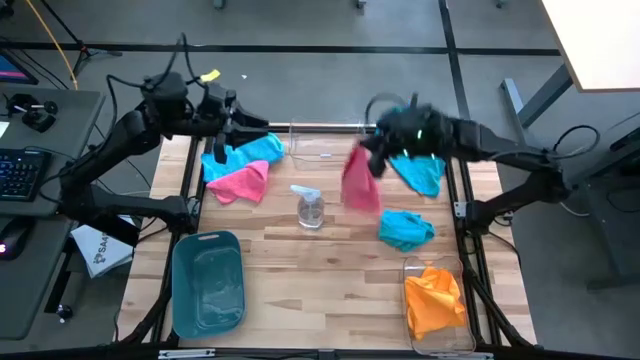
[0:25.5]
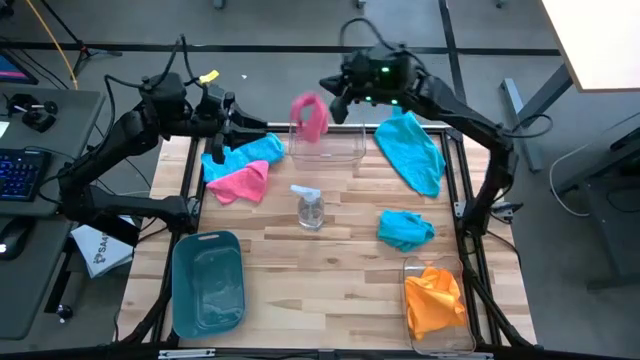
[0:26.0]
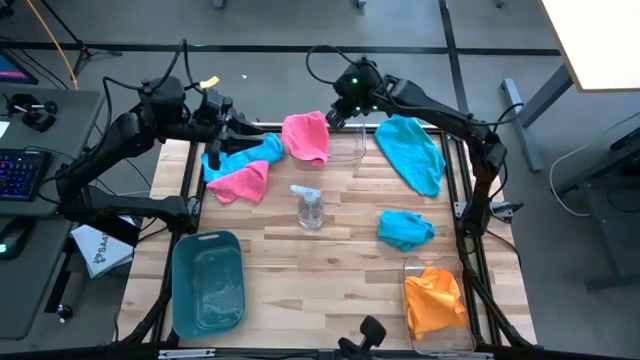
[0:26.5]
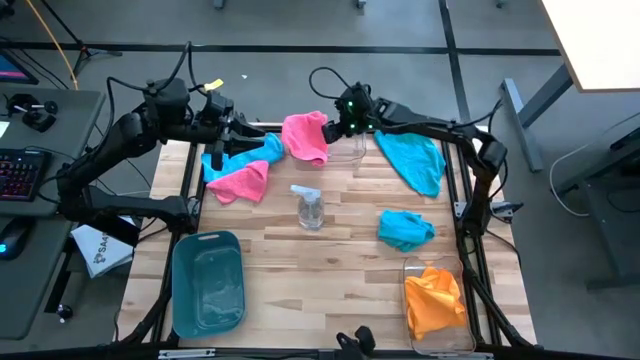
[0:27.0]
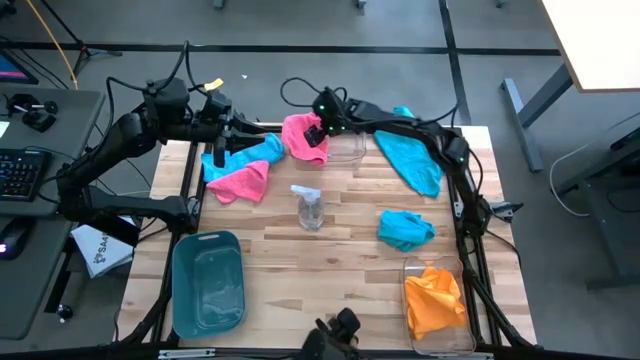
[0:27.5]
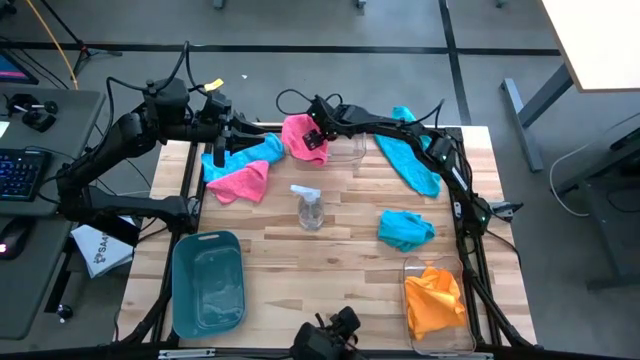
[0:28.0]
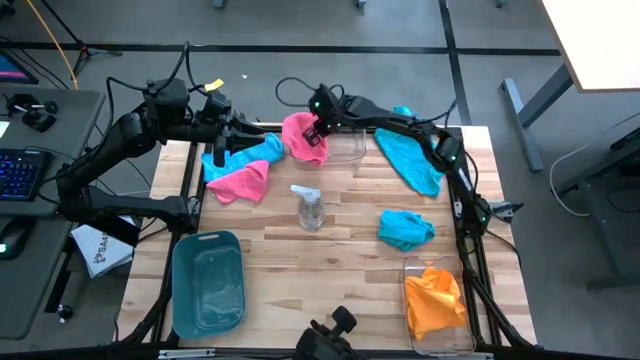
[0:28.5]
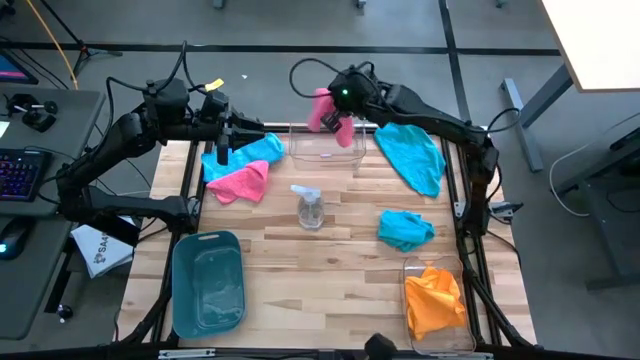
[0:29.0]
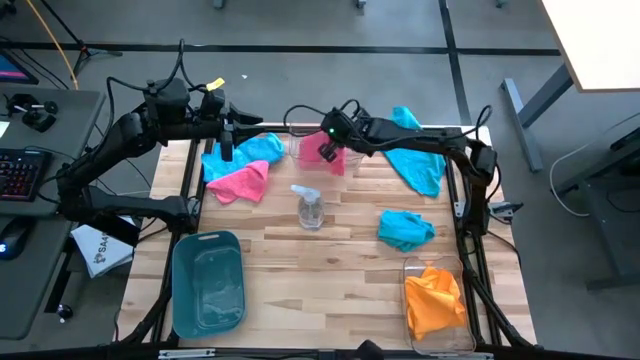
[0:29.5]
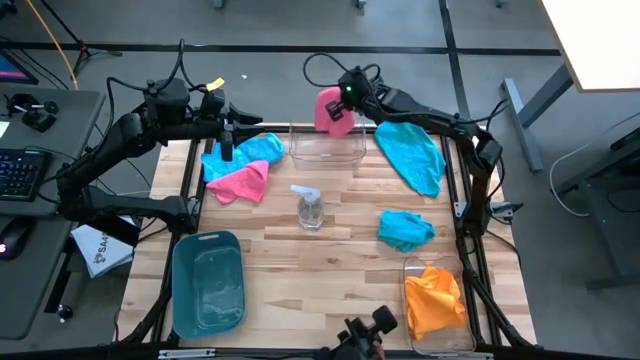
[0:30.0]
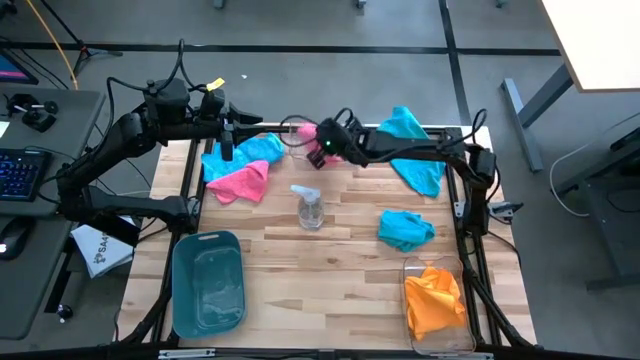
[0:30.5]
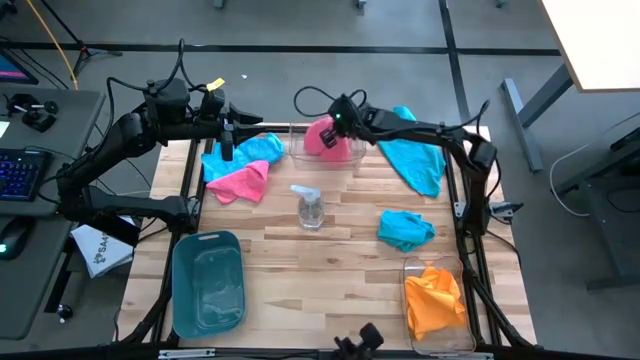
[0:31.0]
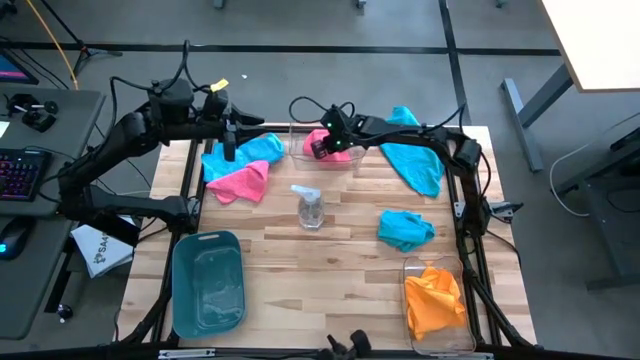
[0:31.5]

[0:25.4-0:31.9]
Task: Sort microfiber towel by color & place in baskets
Put the right pink towel into the top transparent bin

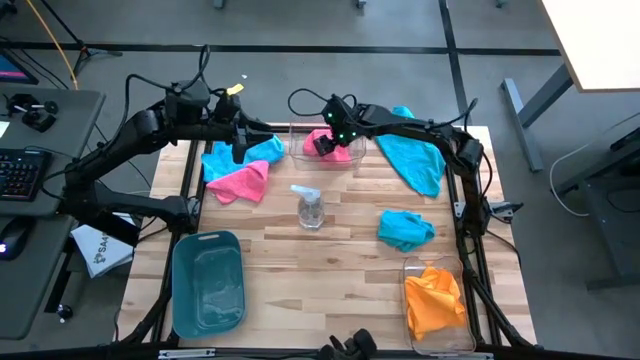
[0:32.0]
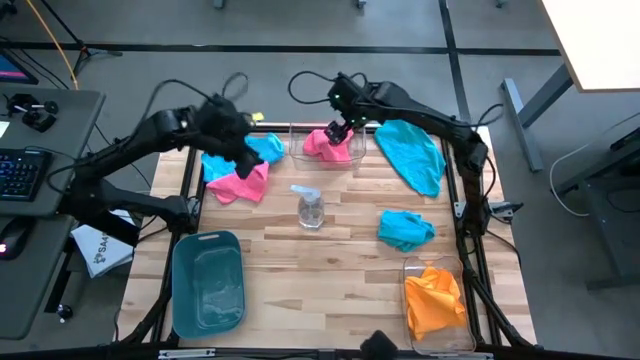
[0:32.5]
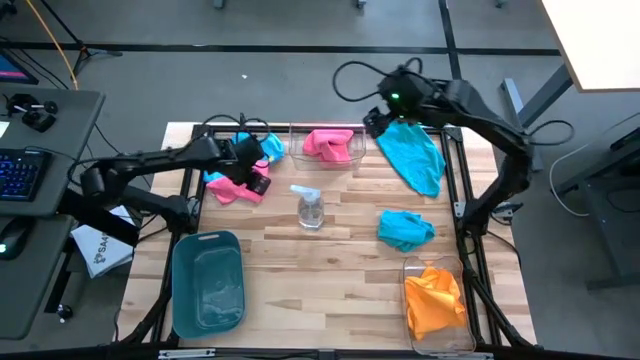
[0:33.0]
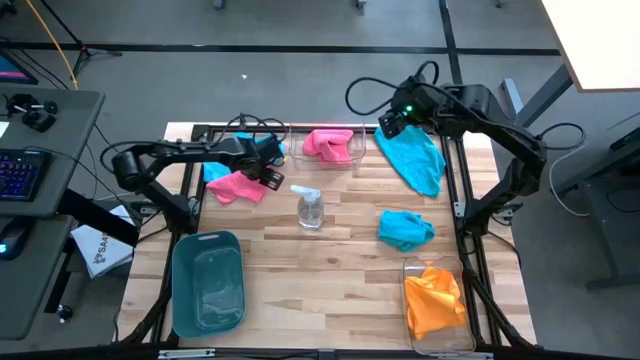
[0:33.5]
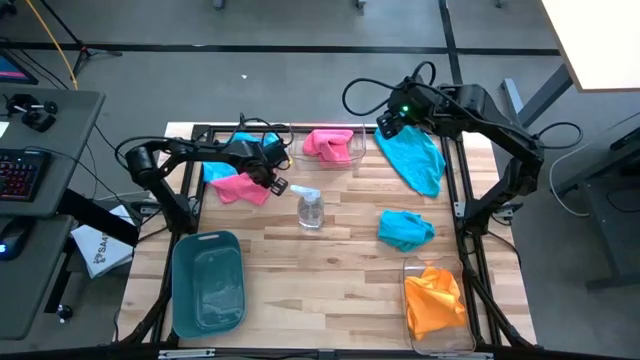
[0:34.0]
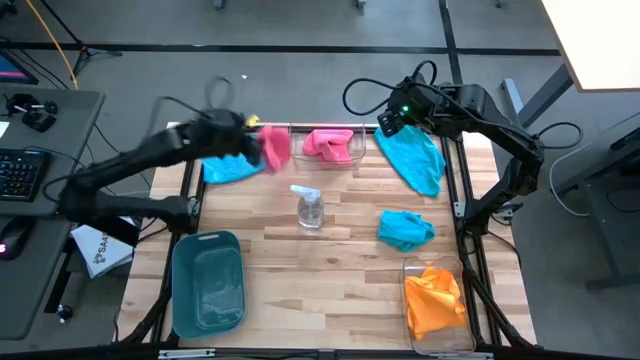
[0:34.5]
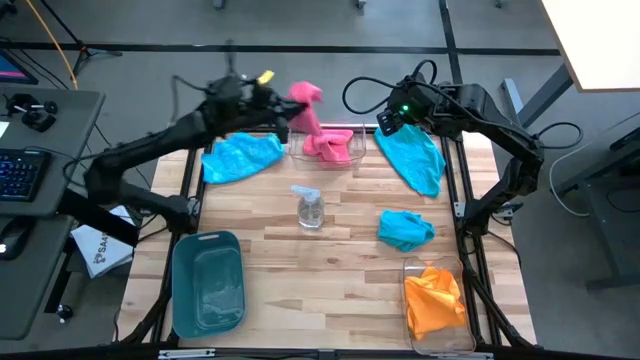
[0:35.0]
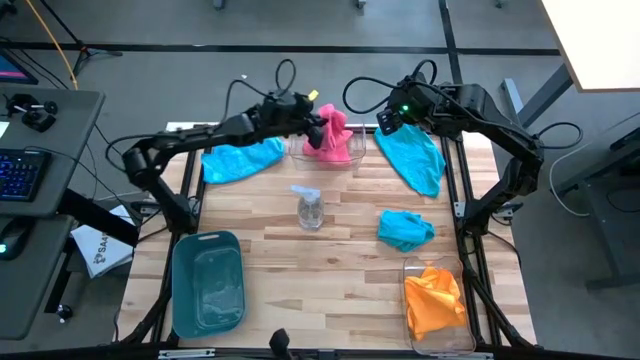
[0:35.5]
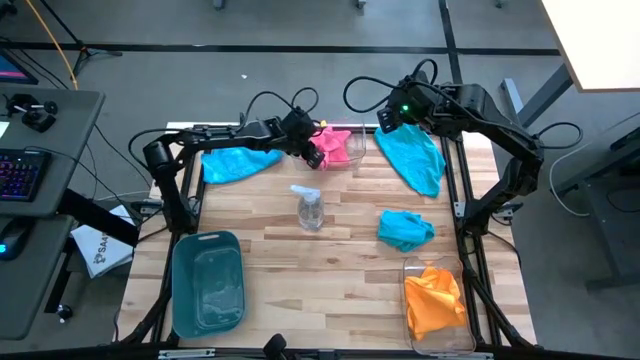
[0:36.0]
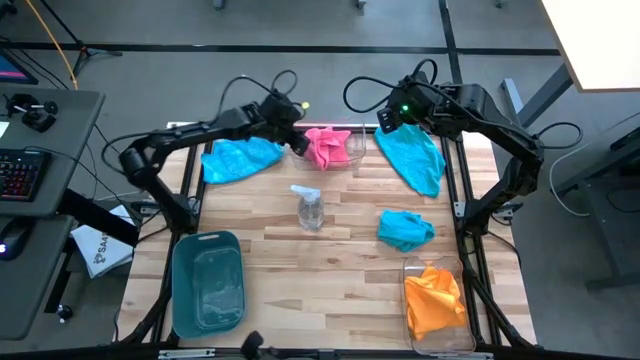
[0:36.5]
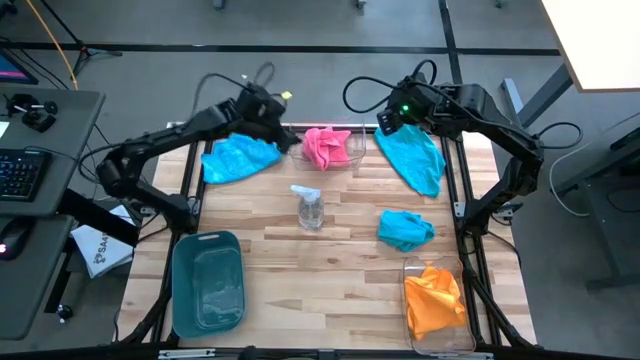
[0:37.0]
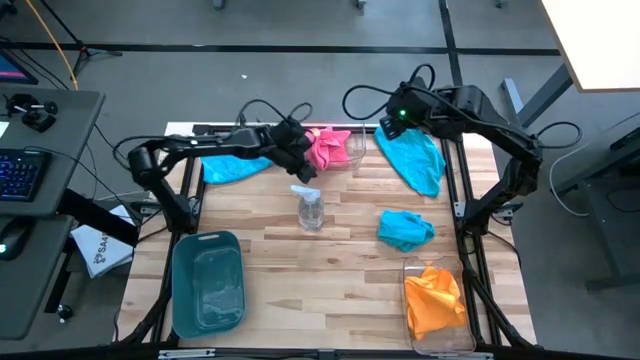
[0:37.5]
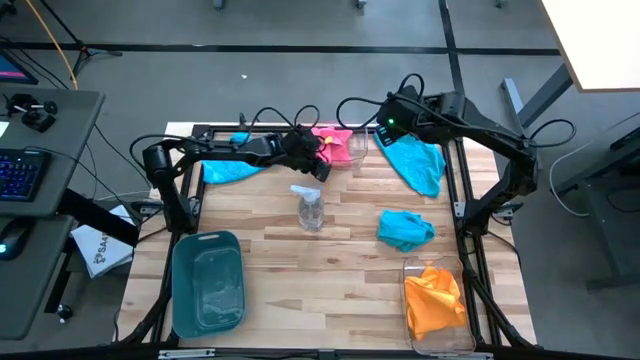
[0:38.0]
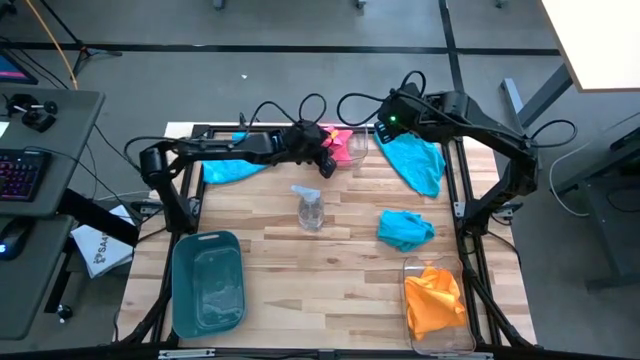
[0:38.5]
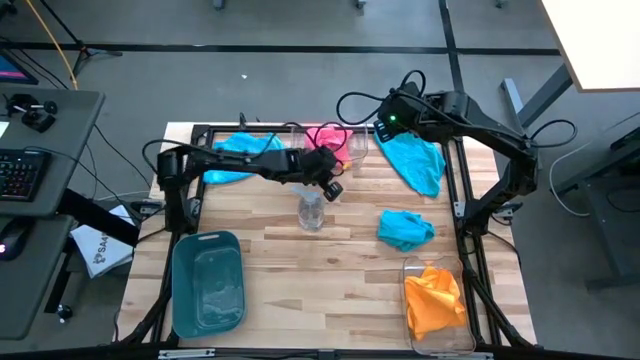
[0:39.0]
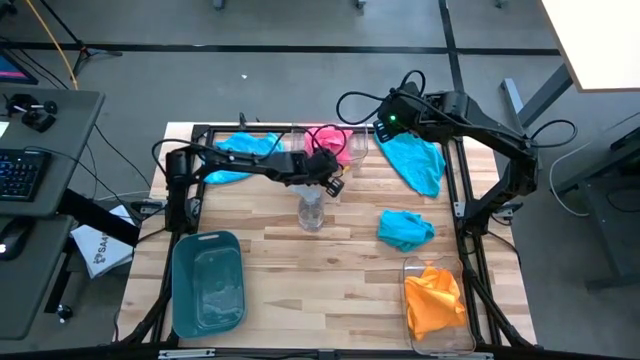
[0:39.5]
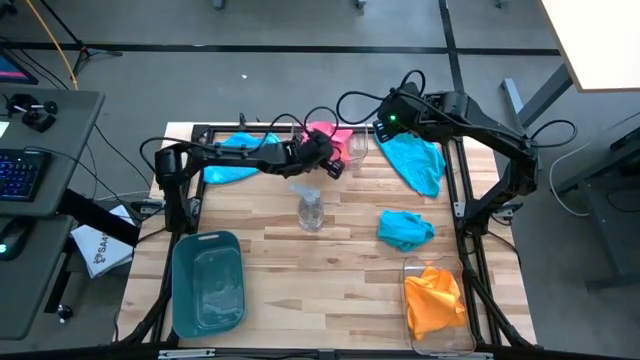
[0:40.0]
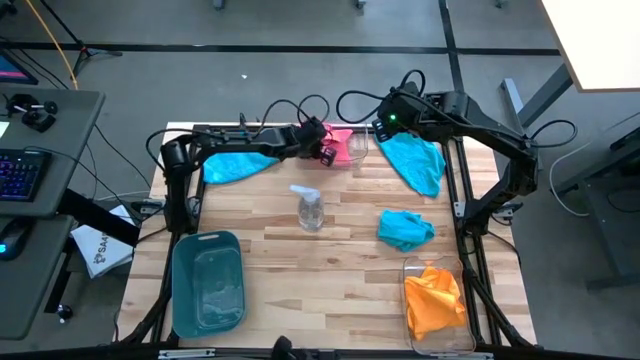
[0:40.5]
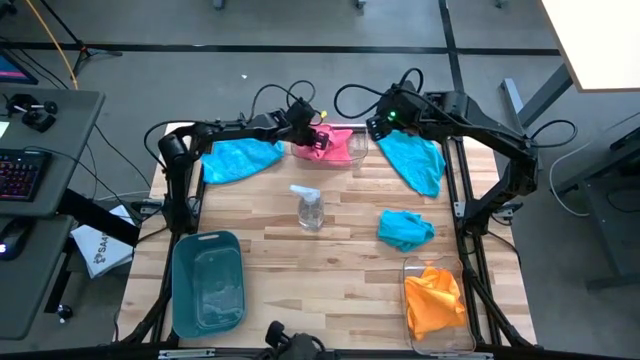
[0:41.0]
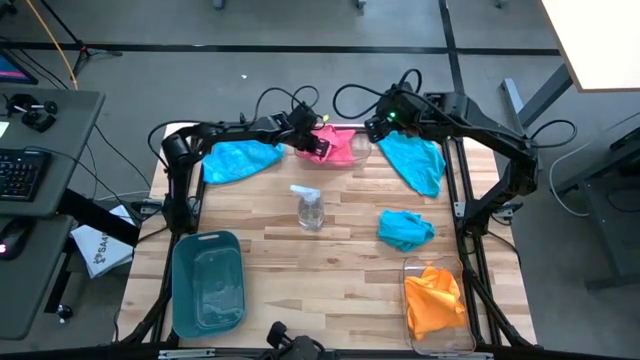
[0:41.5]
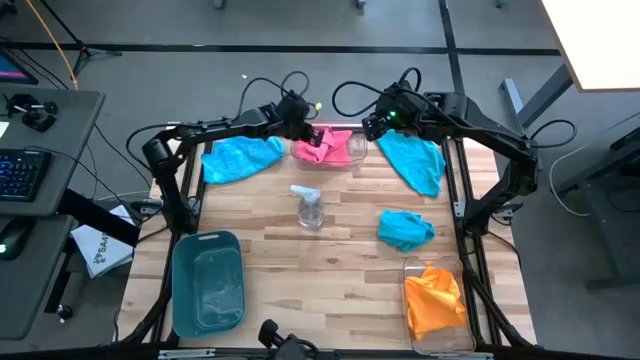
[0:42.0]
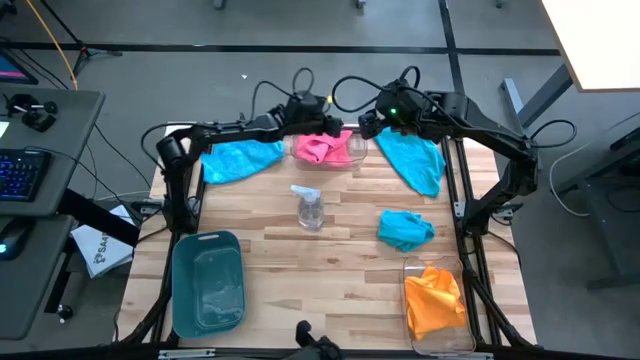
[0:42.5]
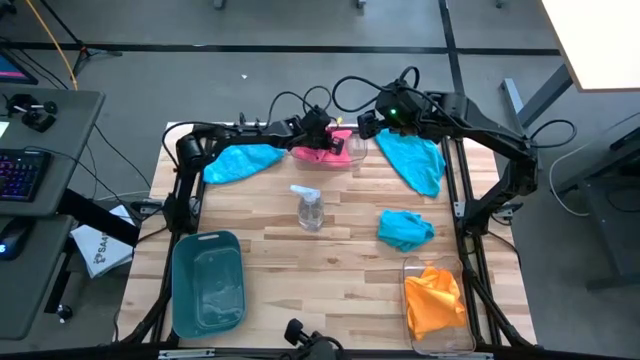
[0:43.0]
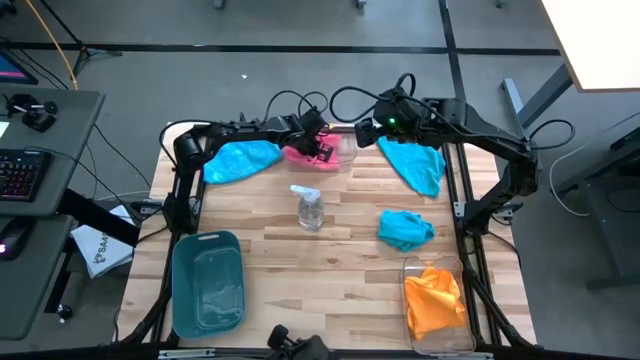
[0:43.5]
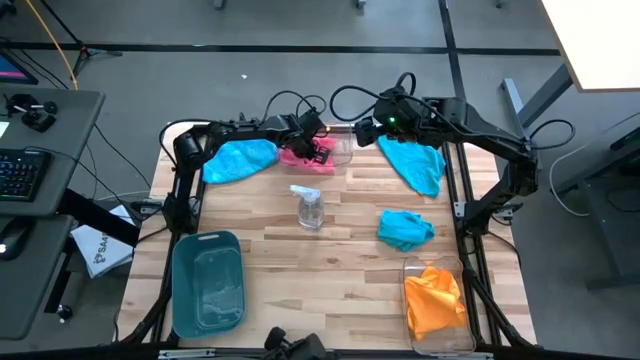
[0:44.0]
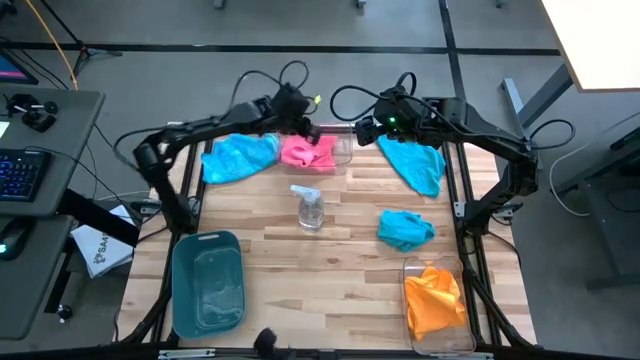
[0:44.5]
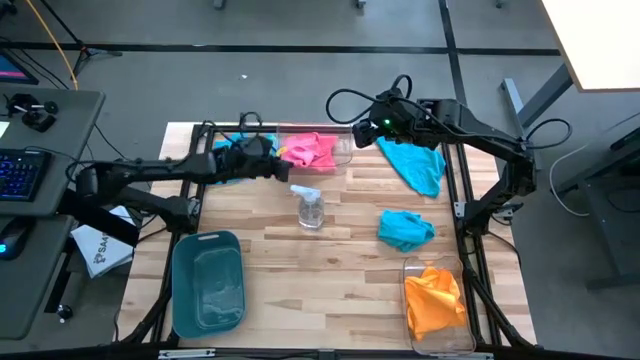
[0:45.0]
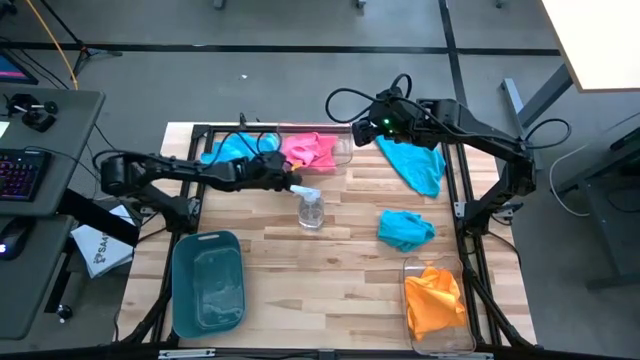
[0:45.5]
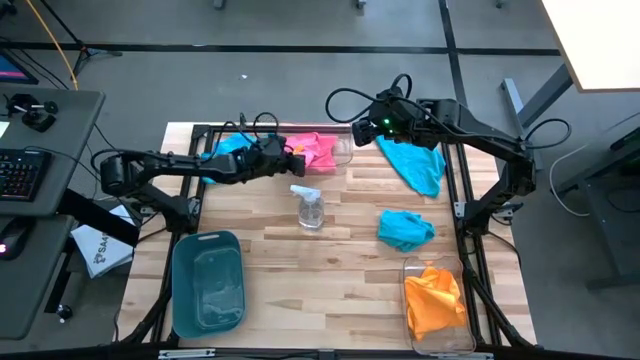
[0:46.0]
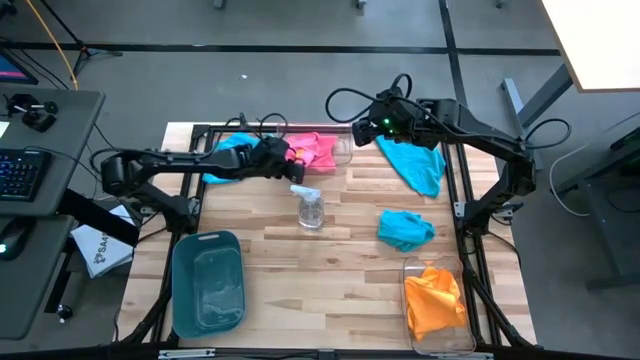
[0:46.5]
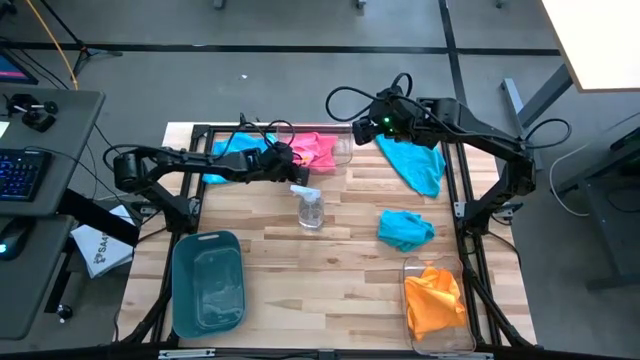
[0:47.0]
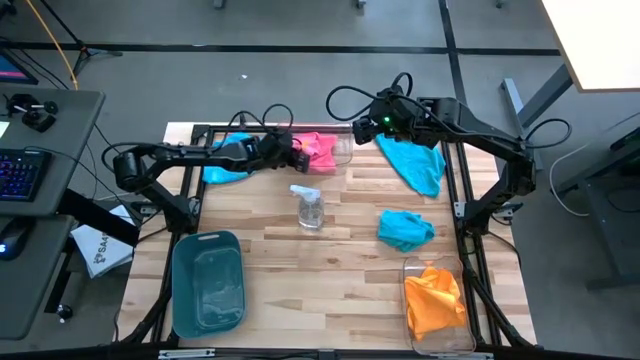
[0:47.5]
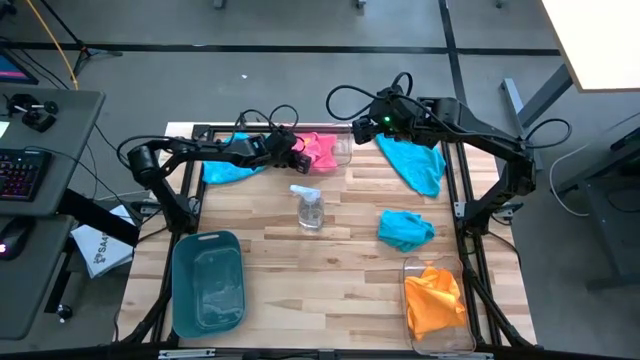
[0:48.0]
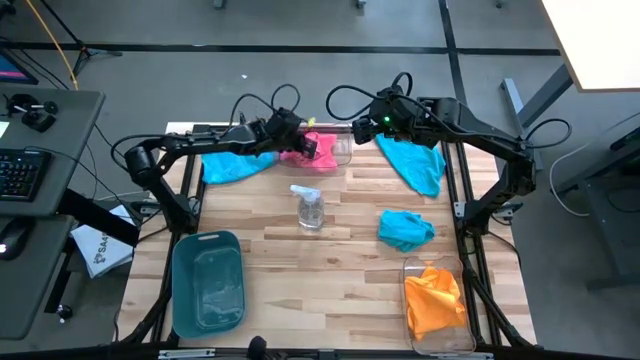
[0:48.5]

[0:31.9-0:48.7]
Put the pink towel into the top transparent bin
